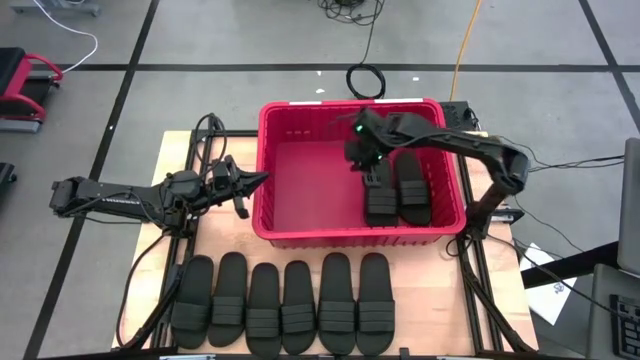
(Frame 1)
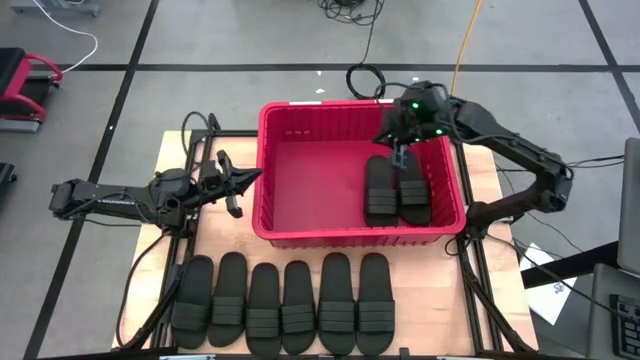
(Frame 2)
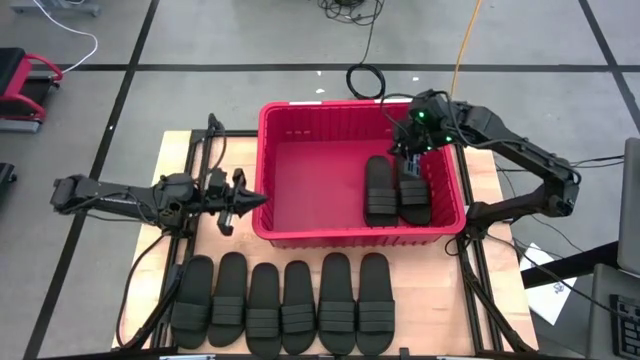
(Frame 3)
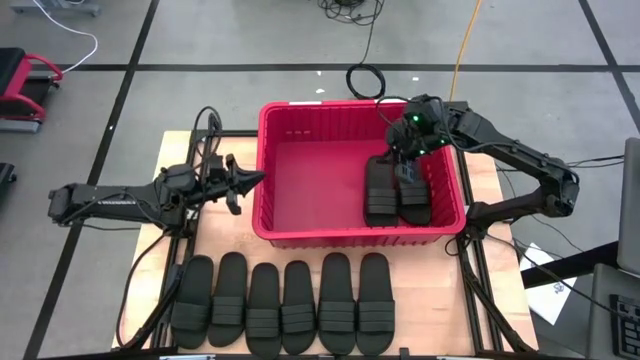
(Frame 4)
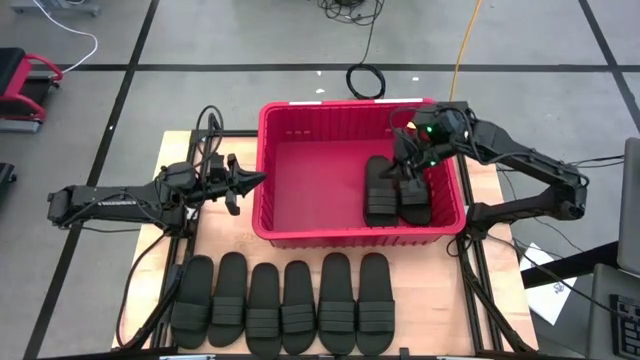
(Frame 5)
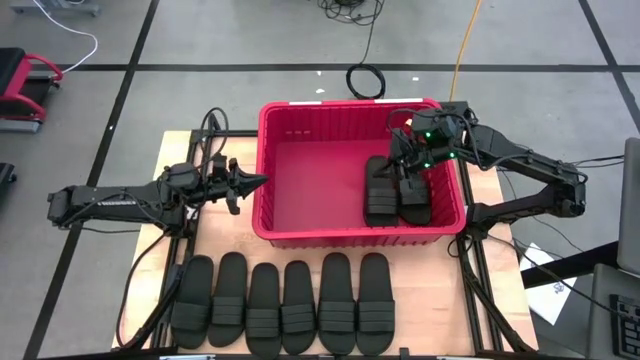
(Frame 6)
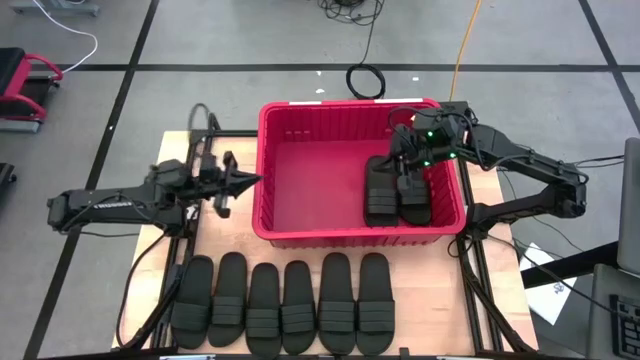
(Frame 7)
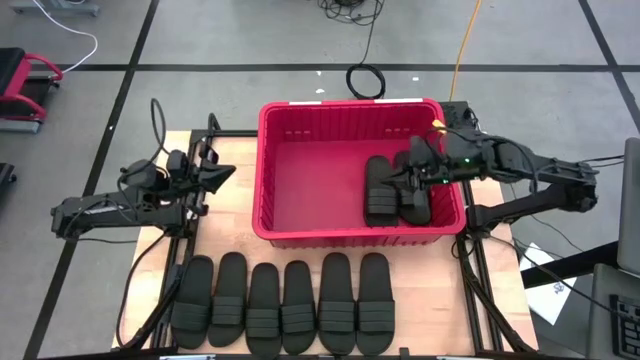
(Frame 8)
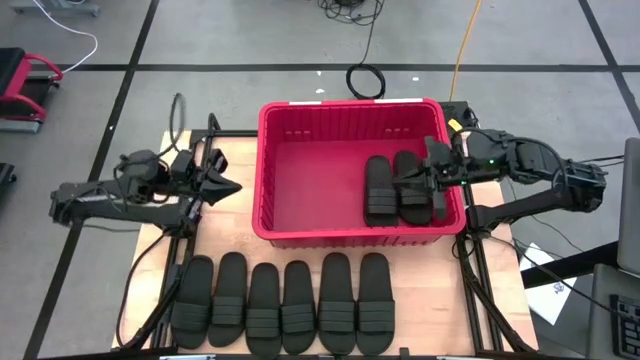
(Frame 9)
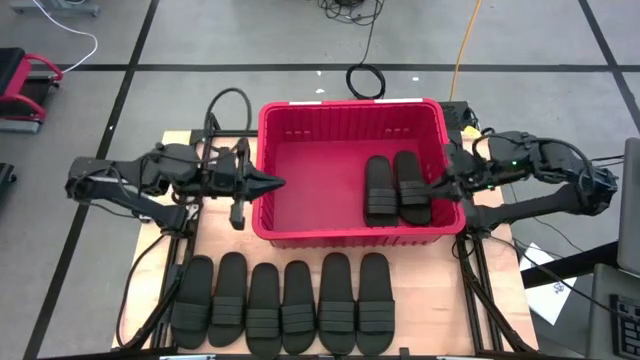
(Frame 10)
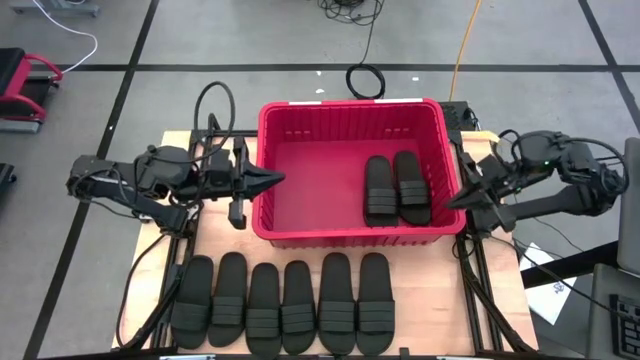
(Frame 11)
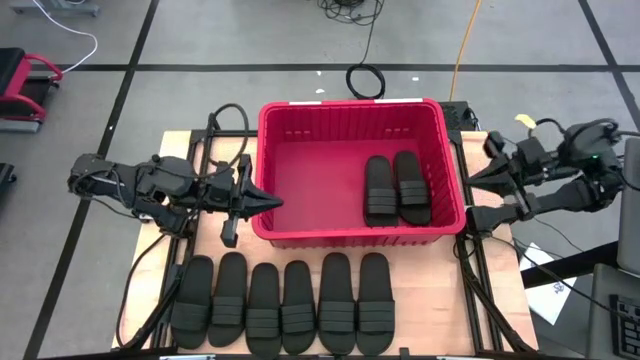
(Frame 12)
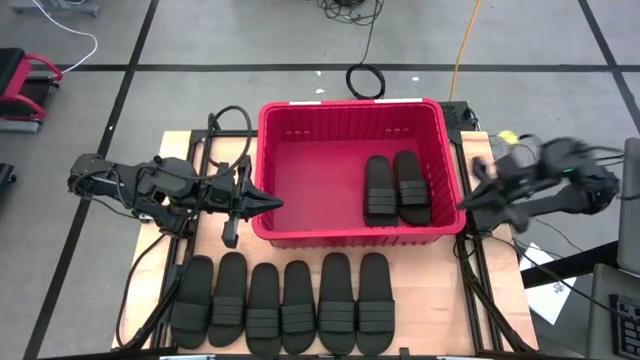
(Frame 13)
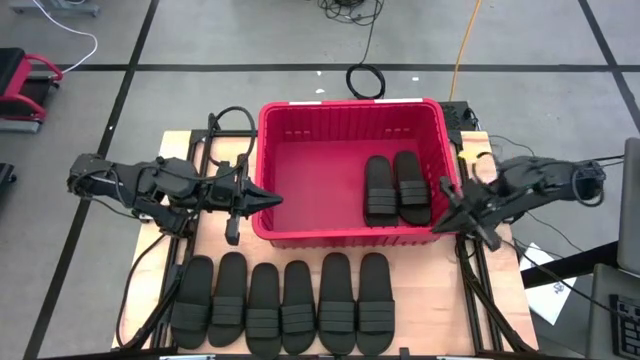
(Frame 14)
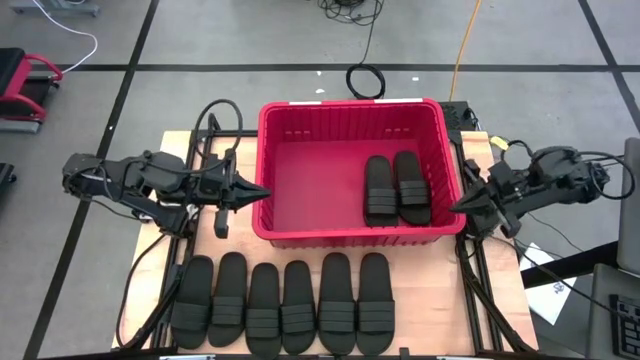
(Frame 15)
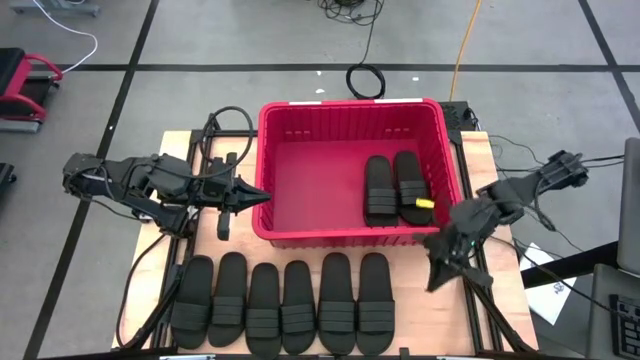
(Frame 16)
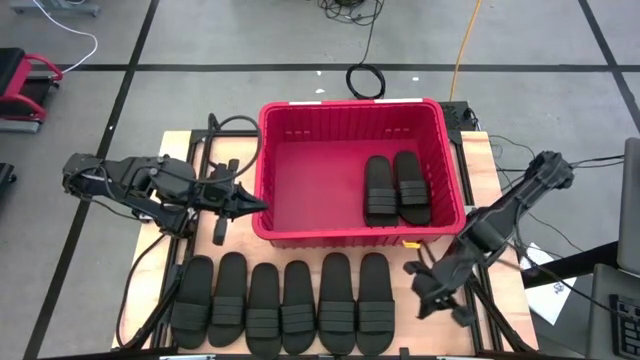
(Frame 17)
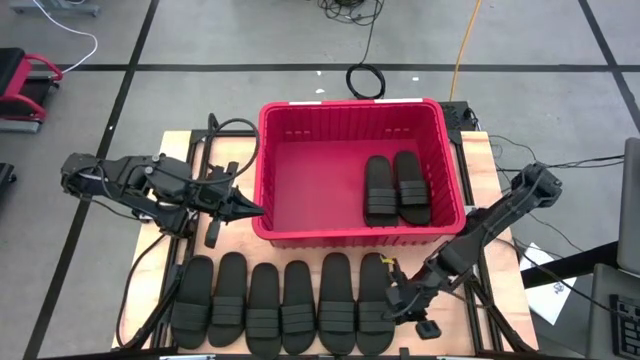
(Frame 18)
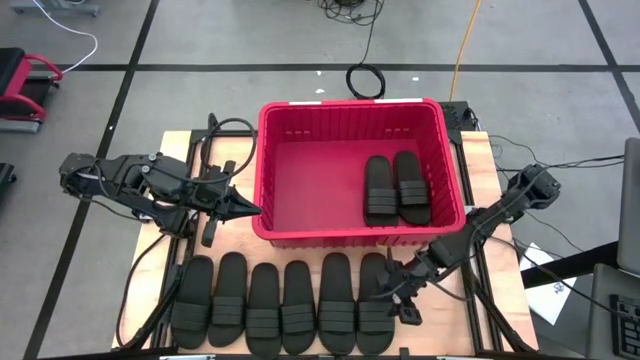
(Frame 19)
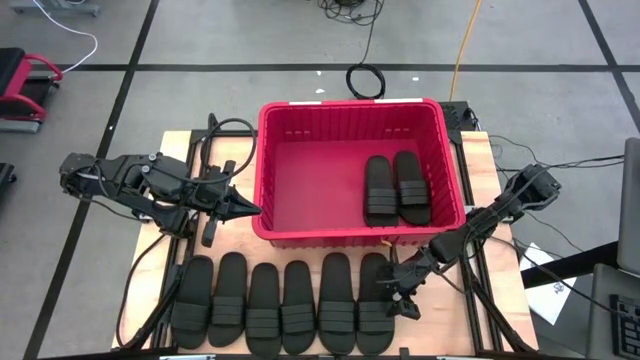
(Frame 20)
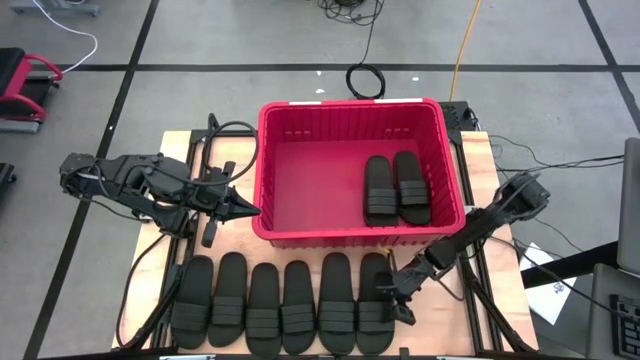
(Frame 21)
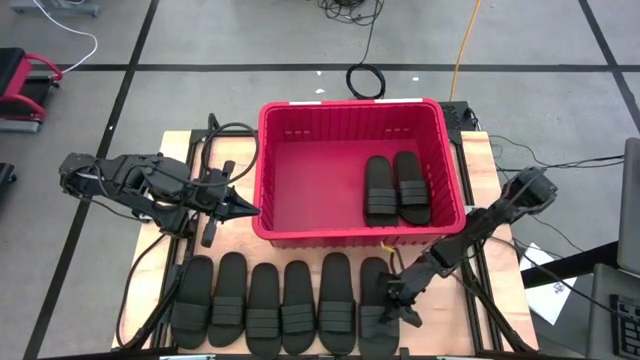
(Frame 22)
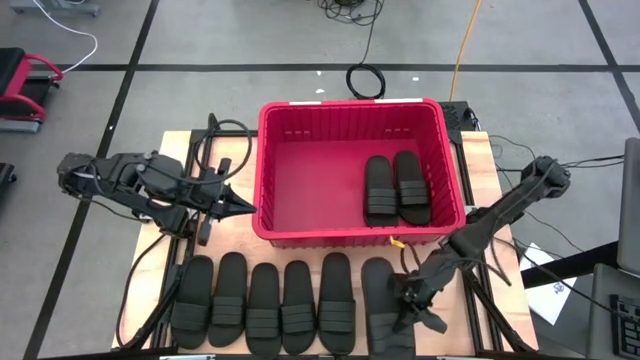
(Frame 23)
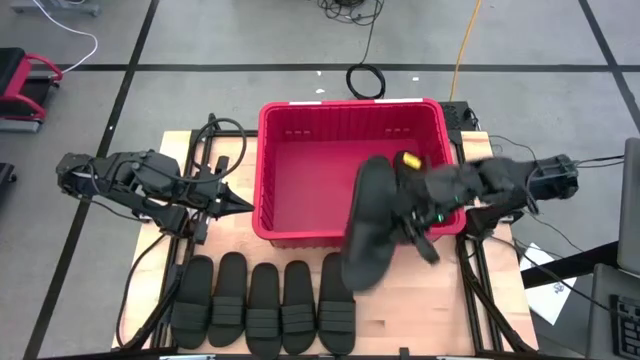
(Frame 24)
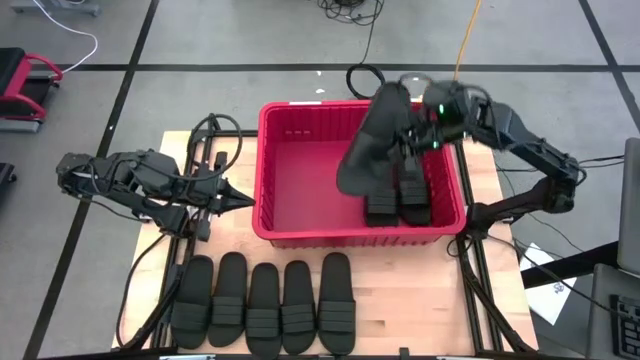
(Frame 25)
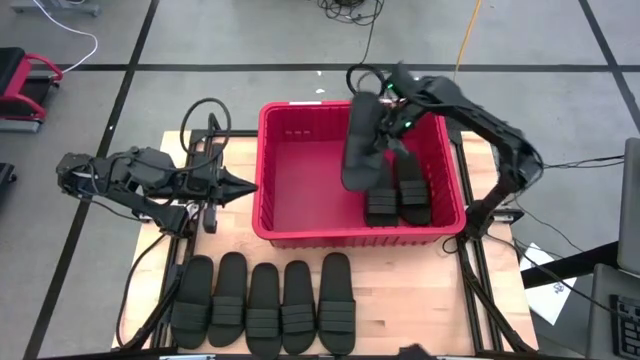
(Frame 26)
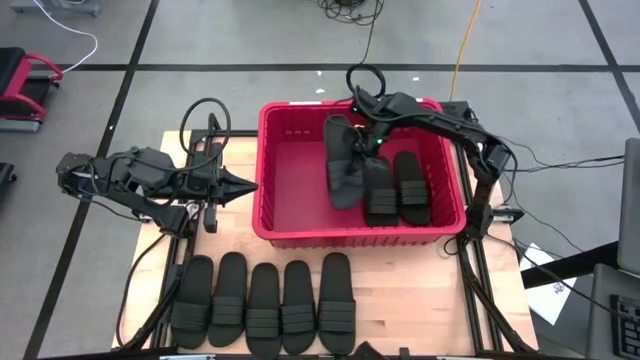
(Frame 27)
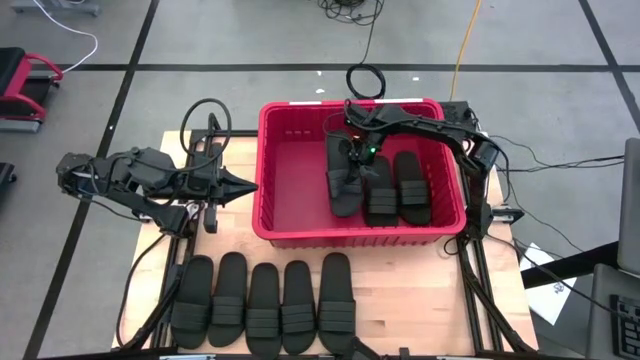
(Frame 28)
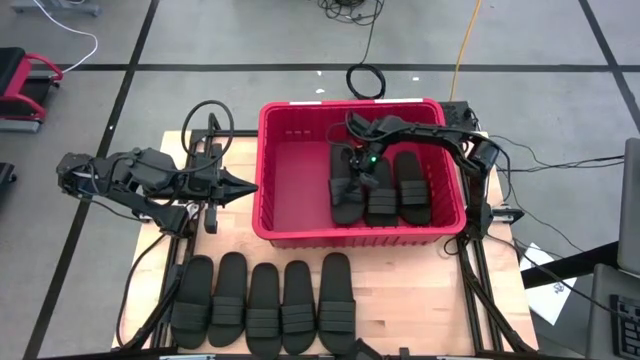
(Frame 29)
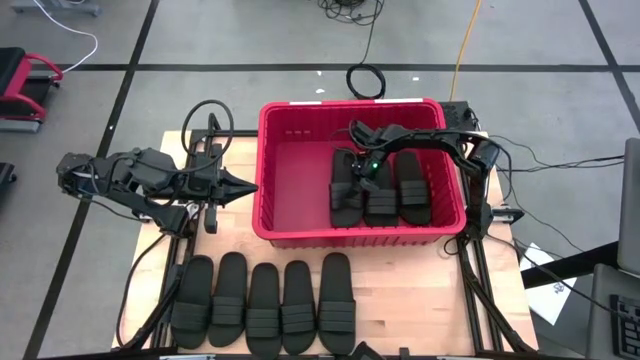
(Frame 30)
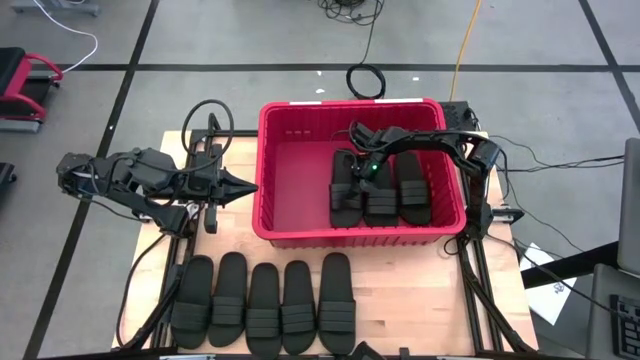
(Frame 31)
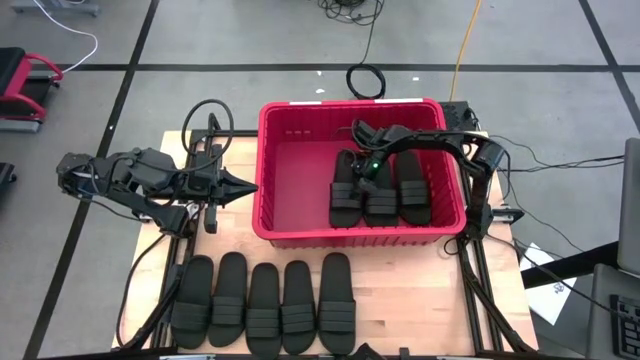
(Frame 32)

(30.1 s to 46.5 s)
Task: Pick and place slides into bin
Put the black slide into the red bin
